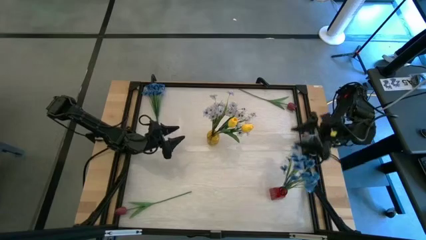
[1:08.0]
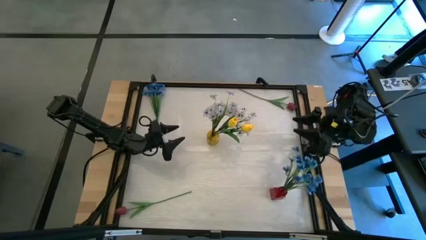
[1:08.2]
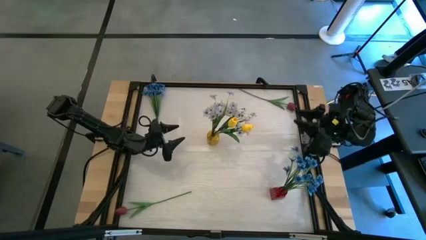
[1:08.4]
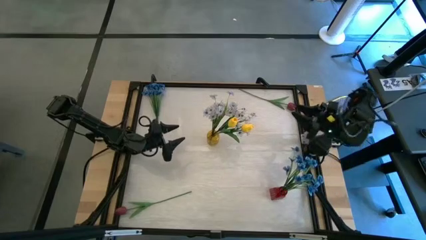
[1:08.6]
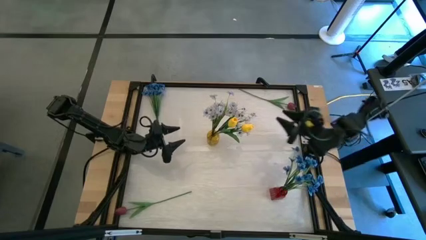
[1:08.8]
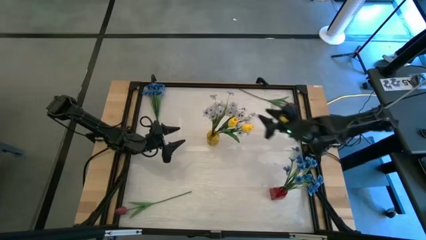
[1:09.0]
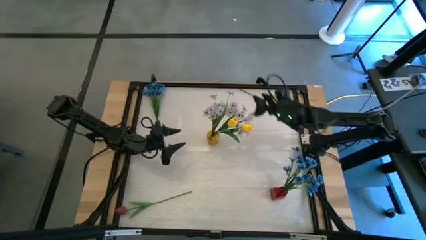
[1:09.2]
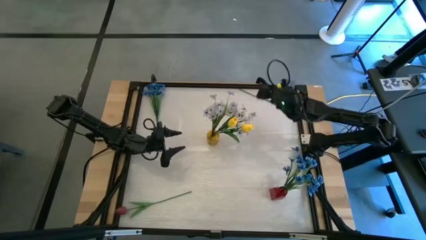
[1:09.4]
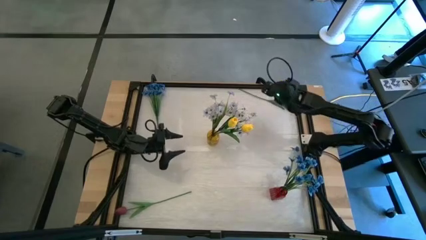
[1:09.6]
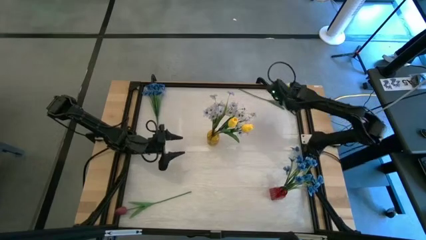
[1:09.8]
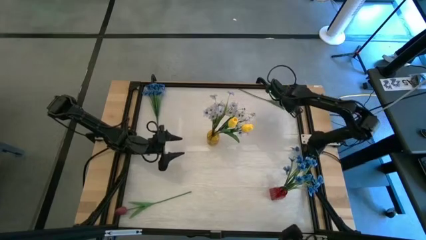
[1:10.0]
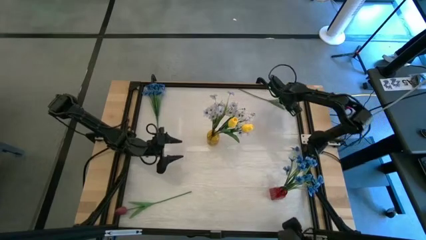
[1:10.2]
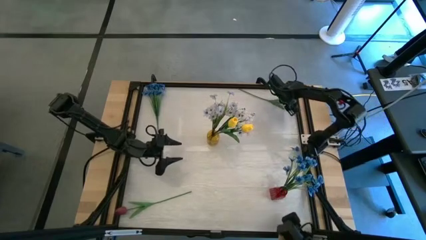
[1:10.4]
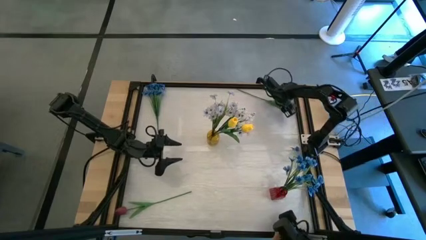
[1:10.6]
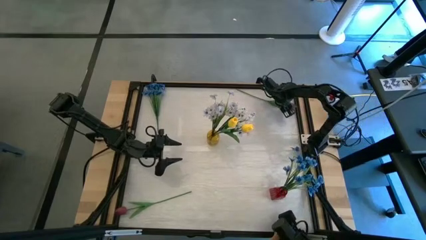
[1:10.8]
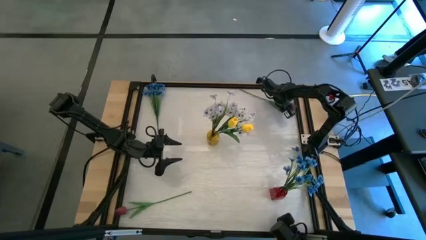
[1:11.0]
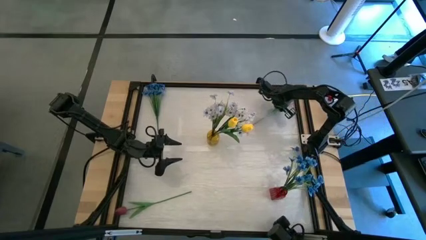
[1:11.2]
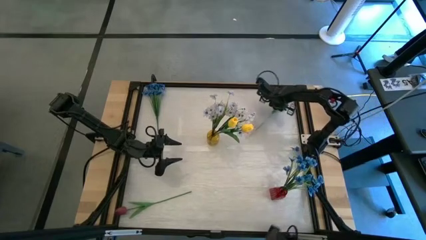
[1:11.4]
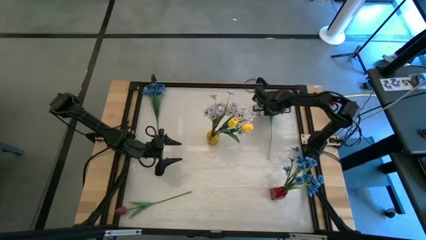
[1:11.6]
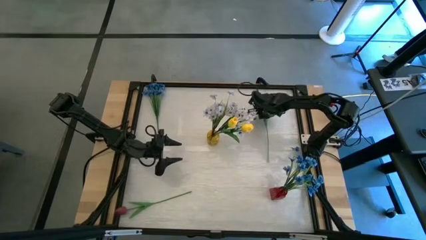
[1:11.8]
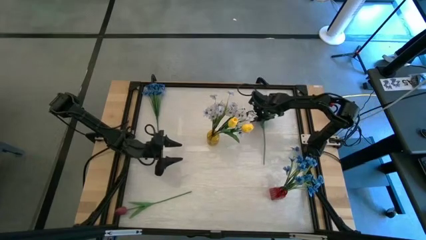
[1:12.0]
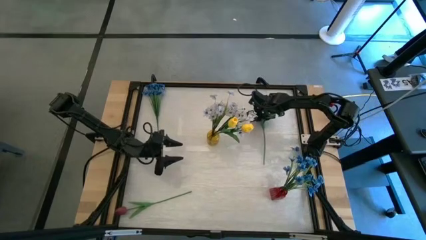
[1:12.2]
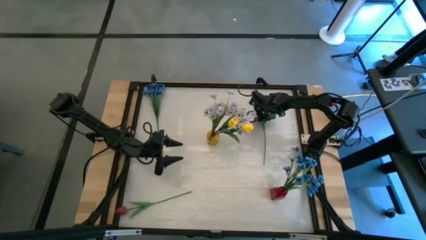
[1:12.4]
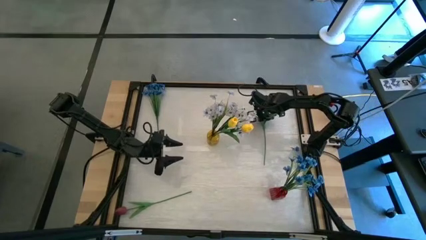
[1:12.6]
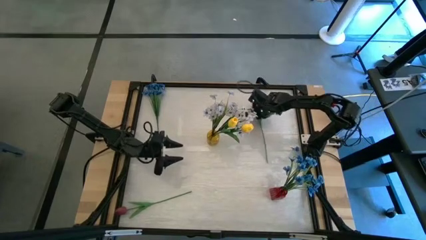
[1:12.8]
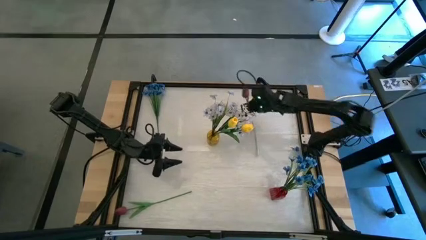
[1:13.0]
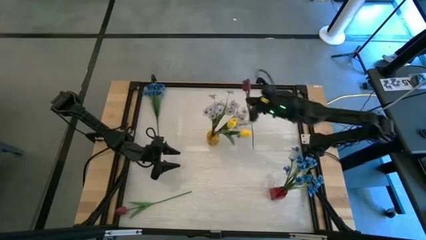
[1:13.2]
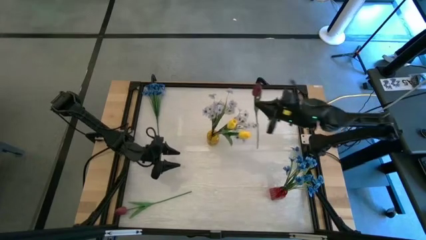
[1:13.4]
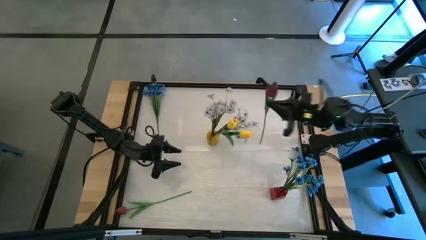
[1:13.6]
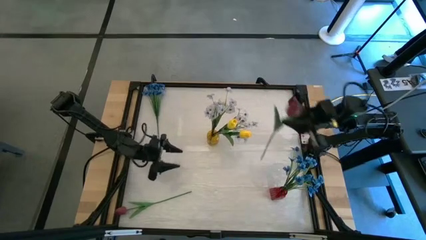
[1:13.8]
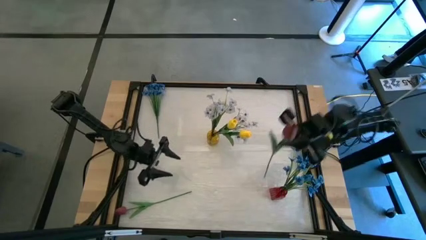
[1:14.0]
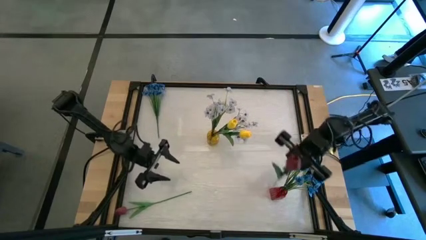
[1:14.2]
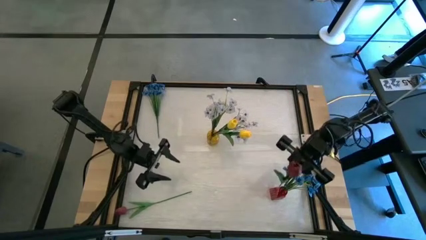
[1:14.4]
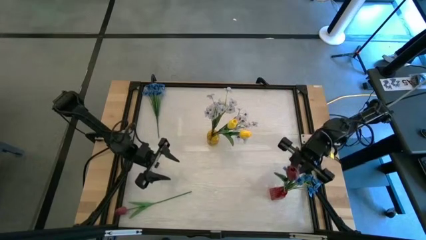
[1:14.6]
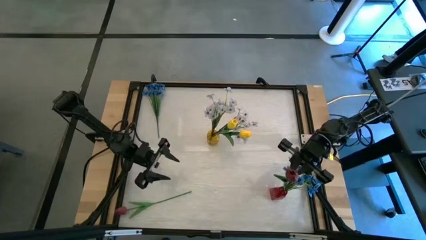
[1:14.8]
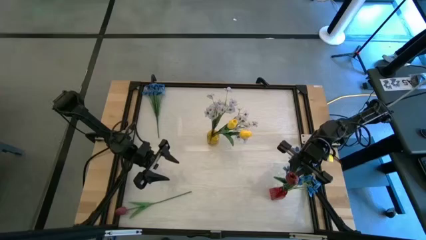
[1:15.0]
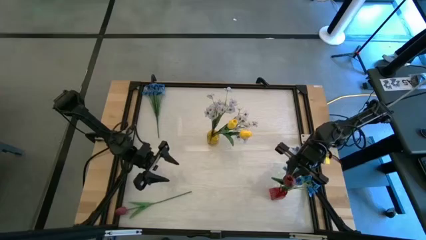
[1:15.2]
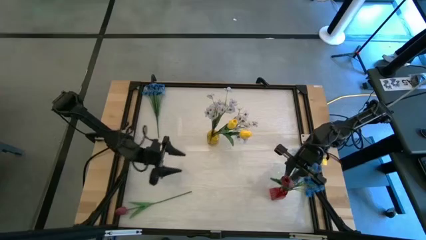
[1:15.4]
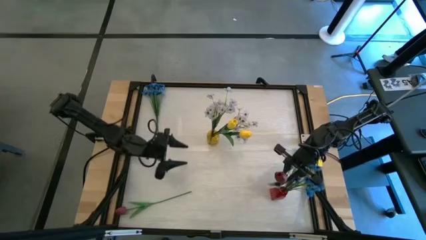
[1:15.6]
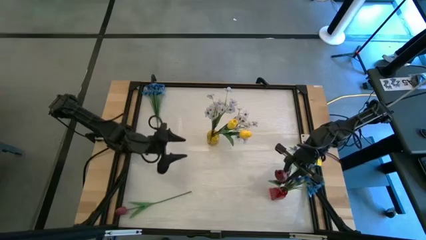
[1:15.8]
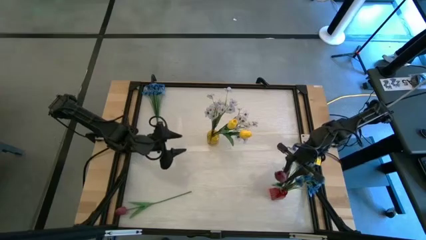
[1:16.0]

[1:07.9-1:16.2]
Task: Sort flowers into vase by color
Put the top red flower into the red vase

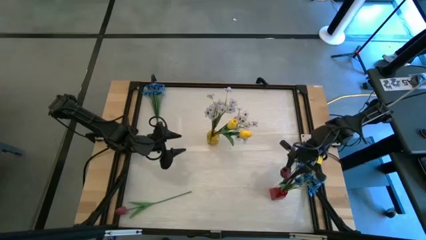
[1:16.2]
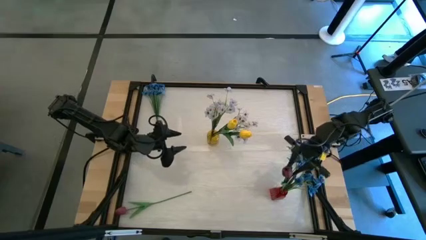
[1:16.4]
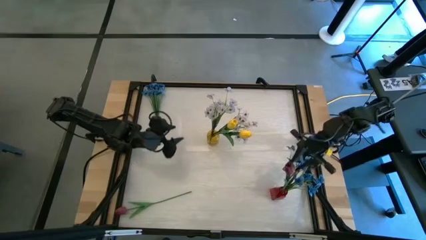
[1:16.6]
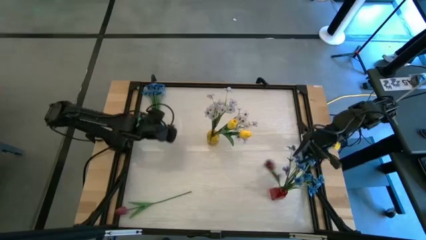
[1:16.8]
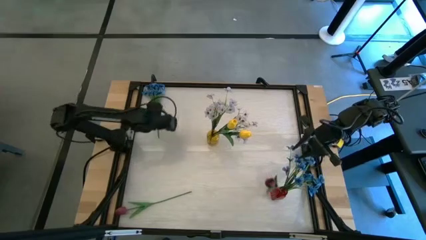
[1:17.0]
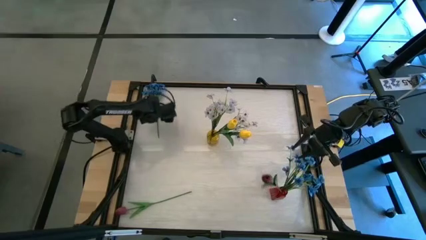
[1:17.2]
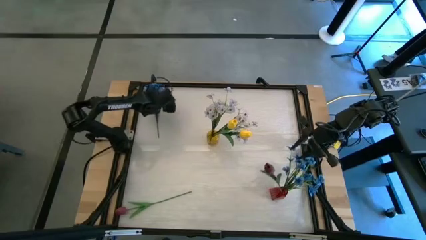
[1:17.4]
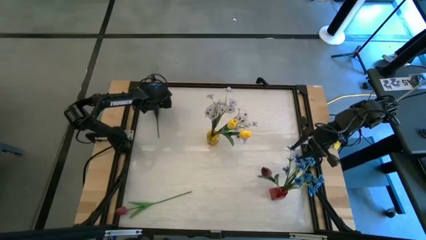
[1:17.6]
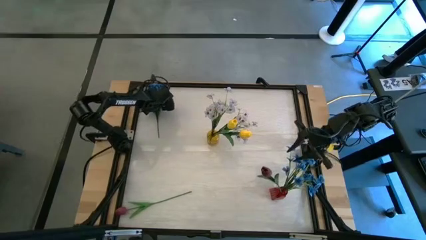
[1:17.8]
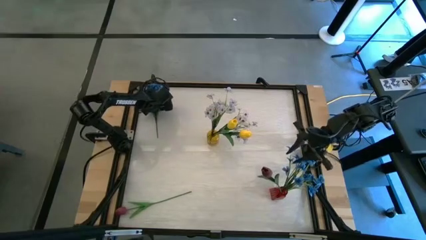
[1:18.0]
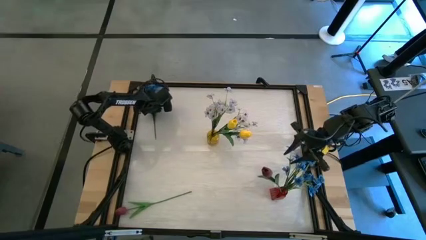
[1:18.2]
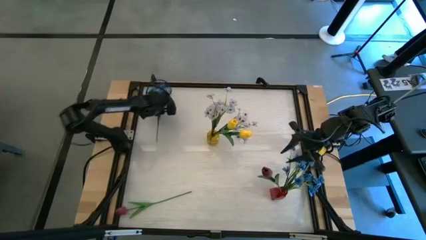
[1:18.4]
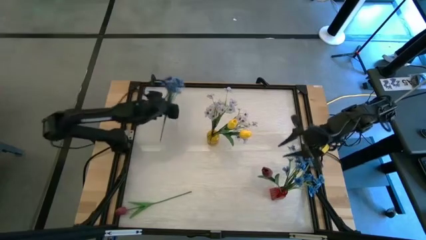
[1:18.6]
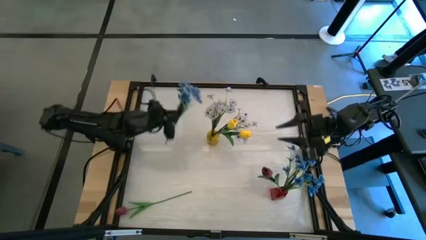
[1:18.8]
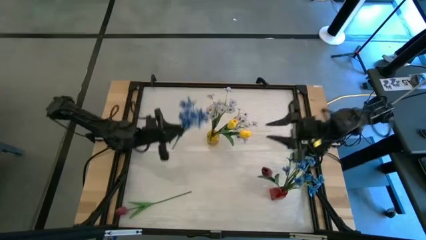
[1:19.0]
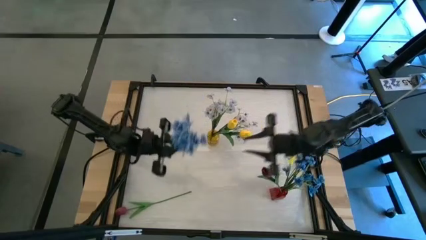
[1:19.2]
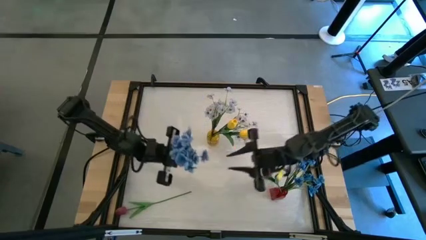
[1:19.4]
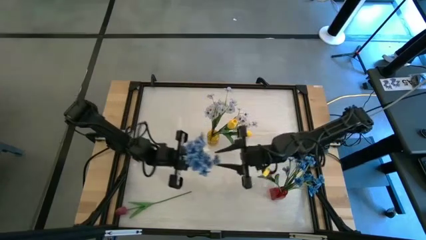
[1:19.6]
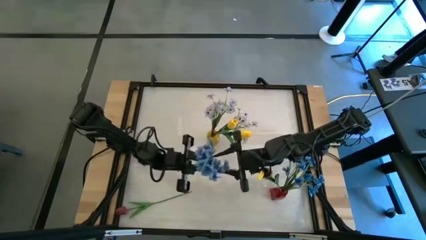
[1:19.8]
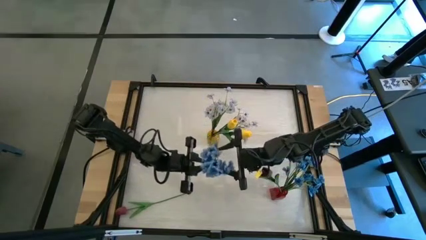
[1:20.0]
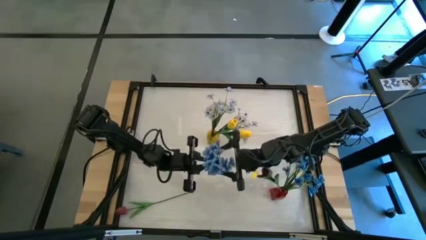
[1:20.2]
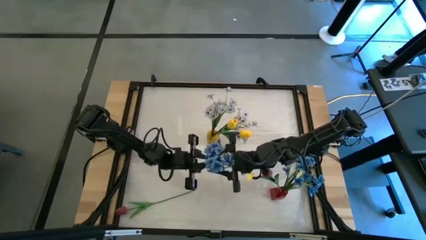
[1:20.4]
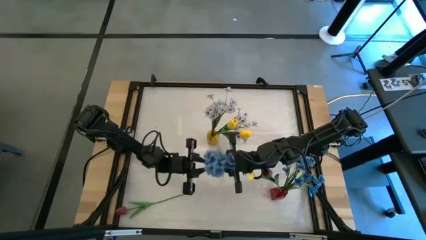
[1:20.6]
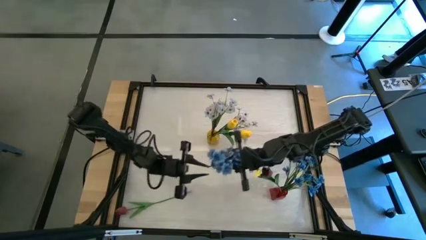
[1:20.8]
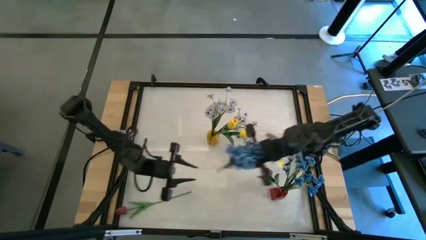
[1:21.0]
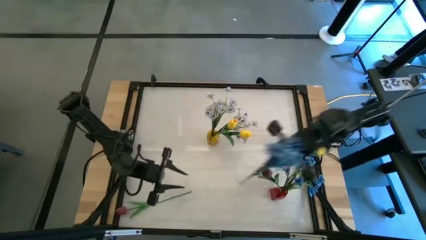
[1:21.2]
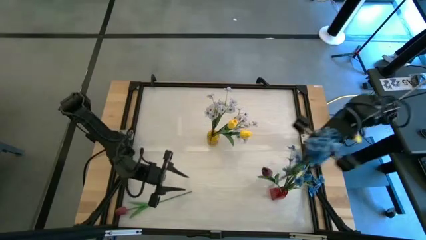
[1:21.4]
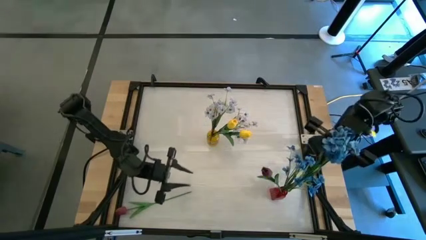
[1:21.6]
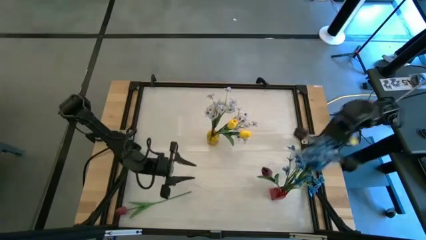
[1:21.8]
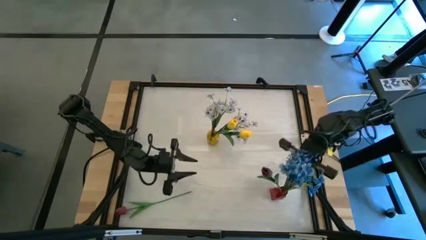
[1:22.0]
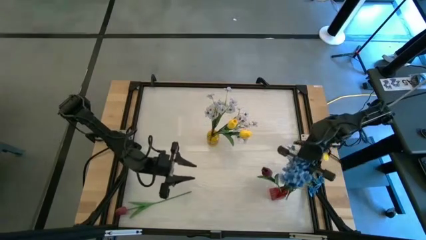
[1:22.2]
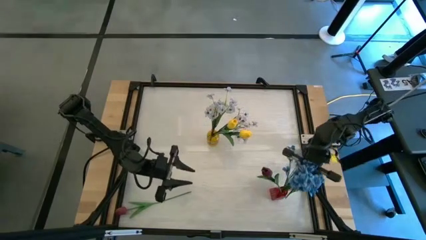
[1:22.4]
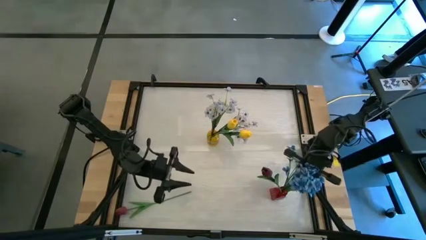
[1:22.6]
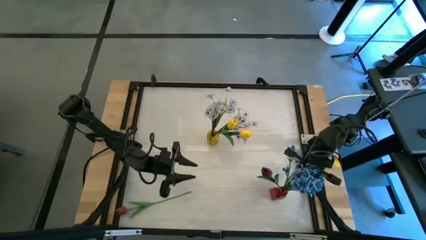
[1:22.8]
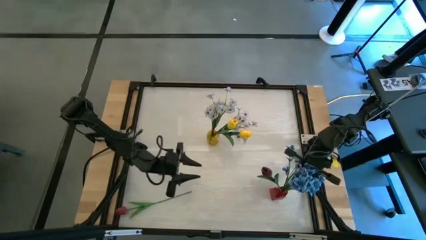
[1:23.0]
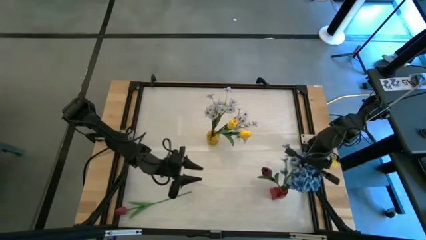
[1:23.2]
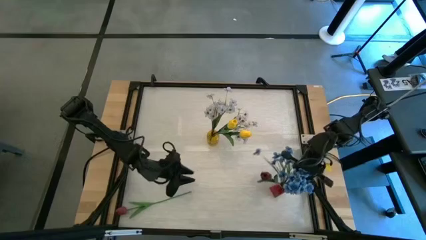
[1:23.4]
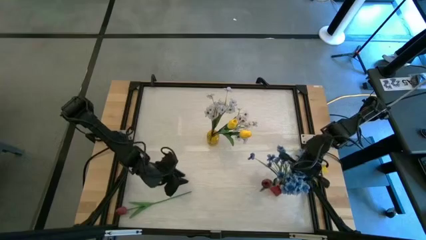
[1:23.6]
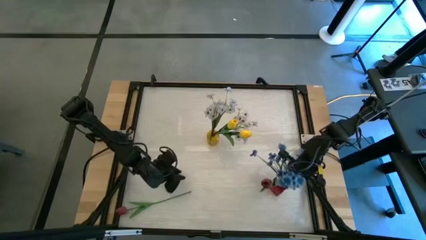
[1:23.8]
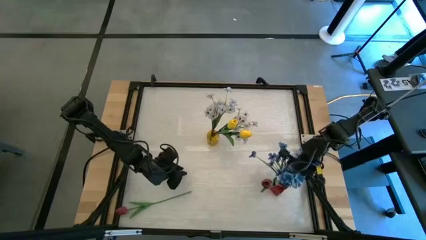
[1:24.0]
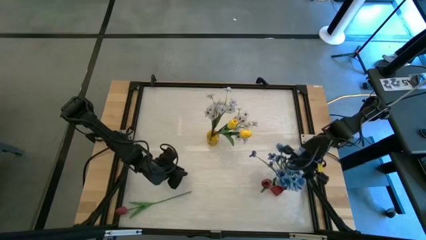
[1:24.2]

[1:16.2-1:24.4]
Put the blue flower into the red vase
